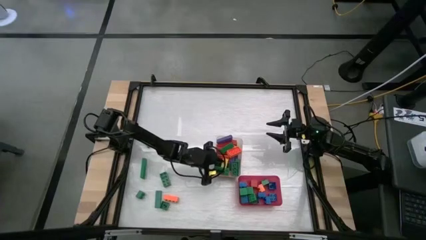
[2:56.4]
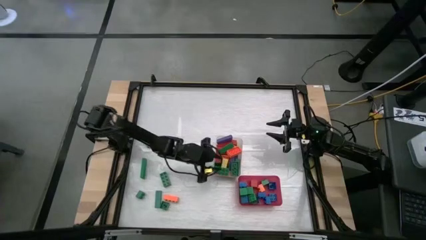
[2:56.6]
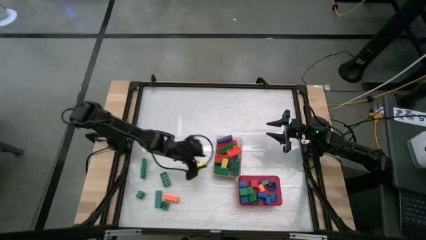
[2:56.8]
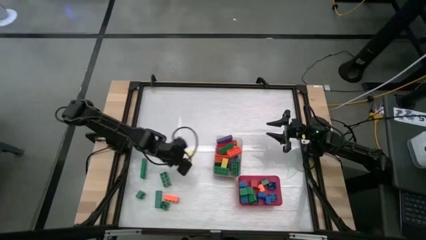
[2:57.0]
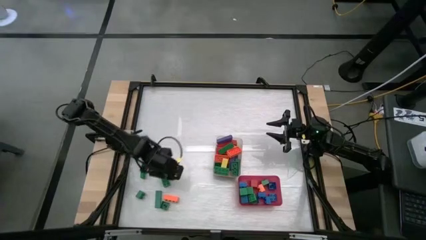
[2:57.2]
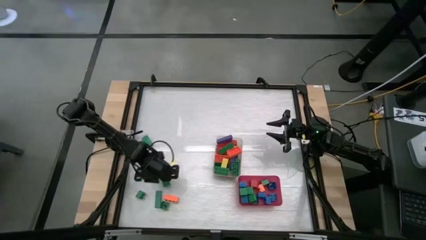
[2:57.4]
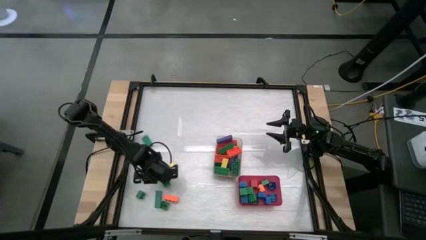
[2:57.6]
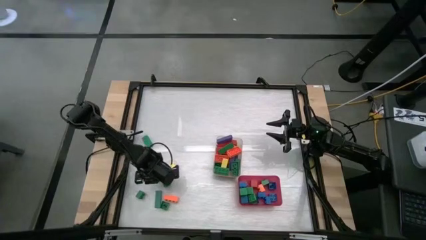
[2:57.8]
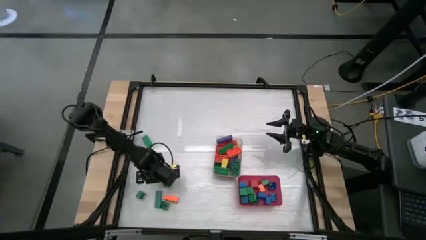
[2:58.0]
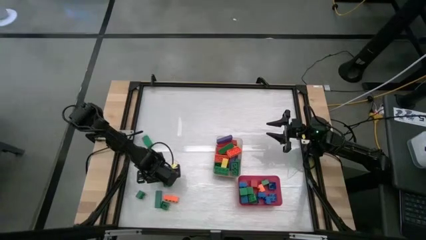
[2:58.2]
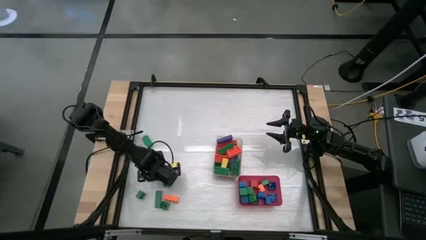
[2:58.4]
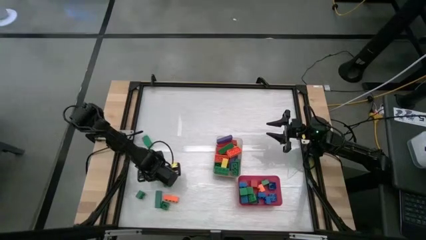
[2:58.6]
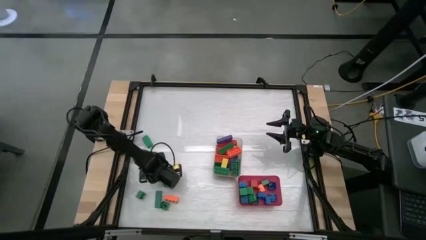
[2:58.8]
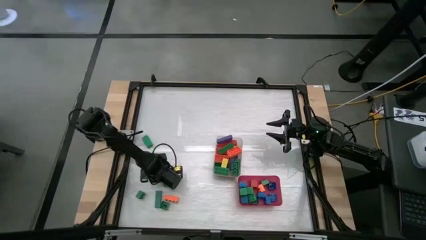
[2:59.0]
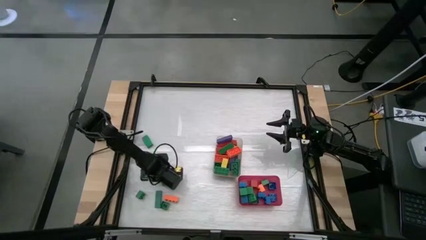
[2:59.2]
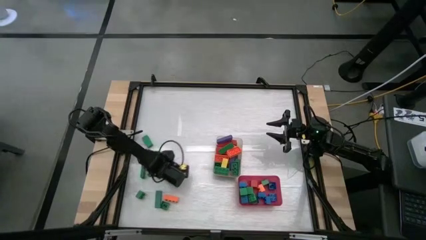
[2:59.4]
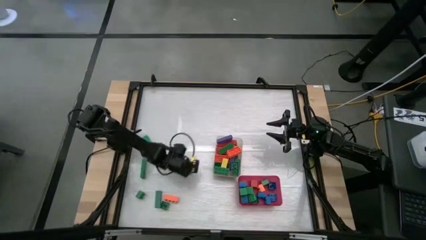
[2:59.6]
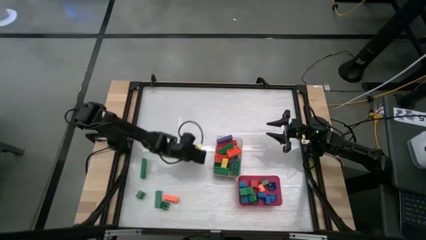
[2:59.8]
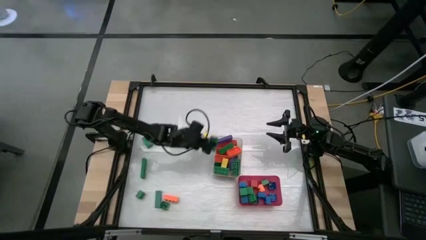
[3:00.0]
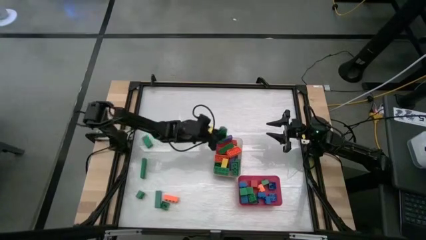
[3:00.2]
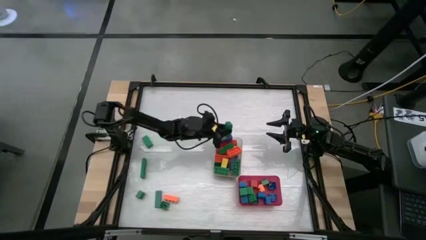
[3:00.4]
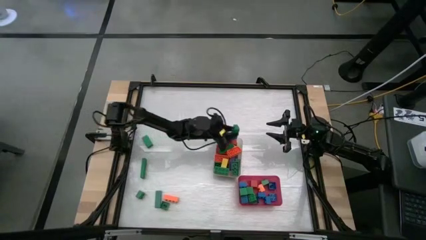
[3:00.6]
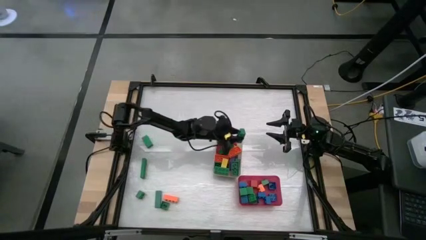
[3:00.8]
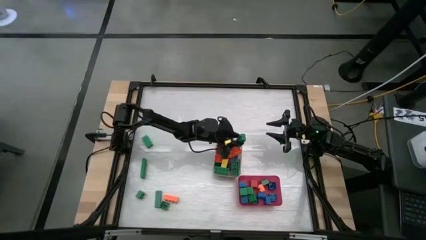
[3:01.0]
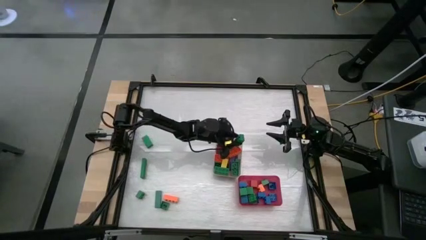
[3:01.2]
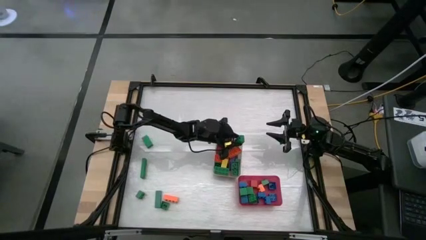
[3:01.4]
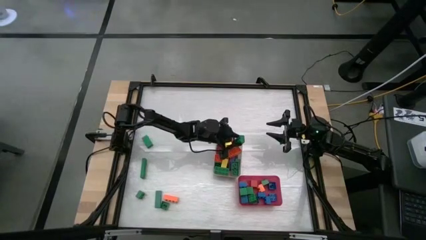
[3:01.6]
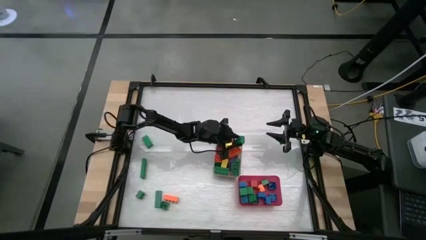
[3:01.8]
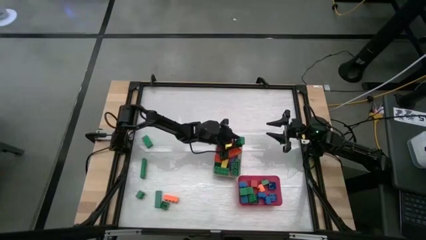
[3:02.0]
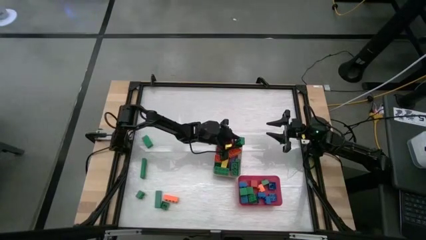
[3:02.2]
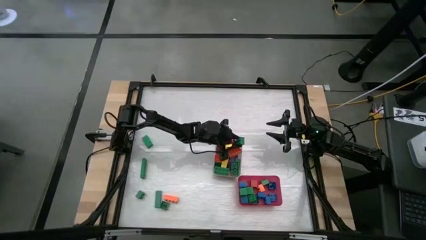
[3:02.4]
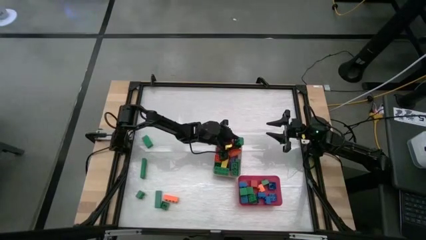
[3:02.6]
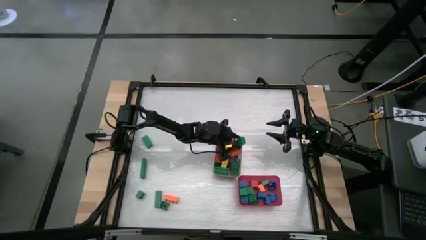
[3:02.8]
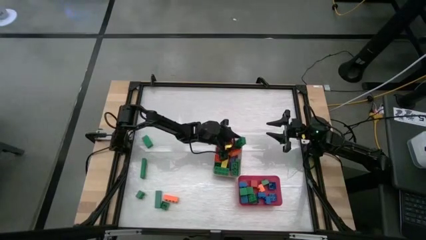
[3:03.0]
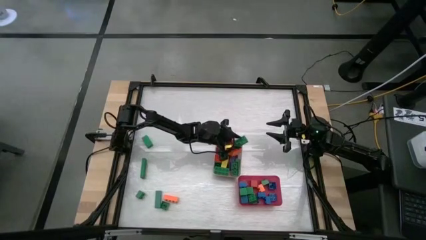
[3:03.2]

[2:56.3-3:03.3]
Task: Sort blocks by size
Put the green rectangular game piece into the transparent bin

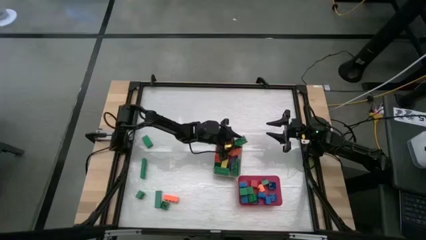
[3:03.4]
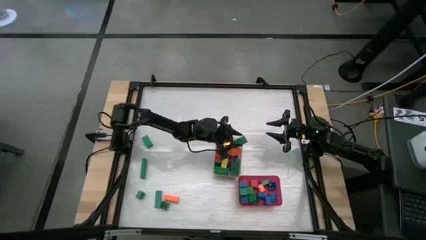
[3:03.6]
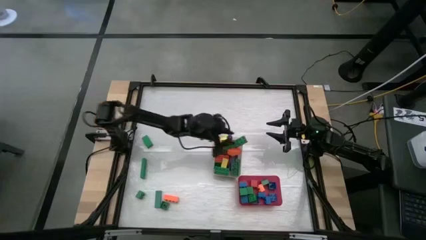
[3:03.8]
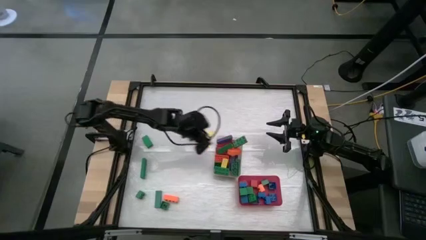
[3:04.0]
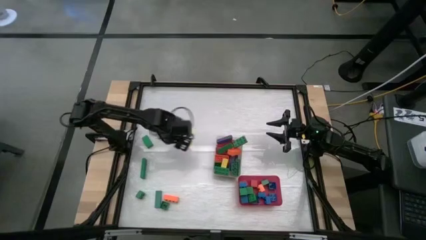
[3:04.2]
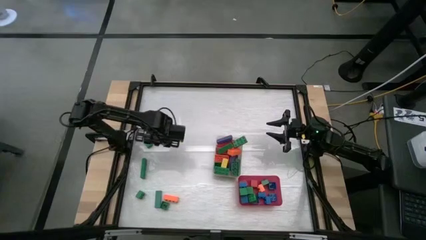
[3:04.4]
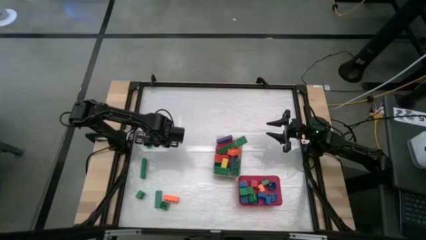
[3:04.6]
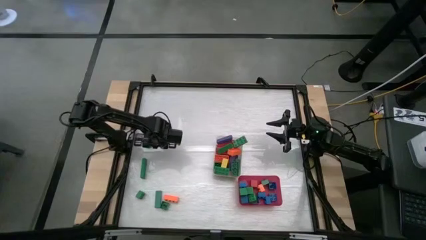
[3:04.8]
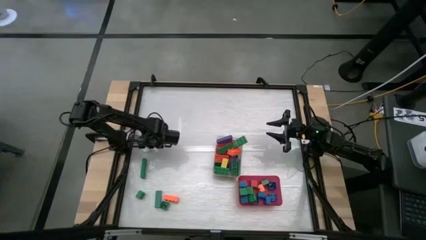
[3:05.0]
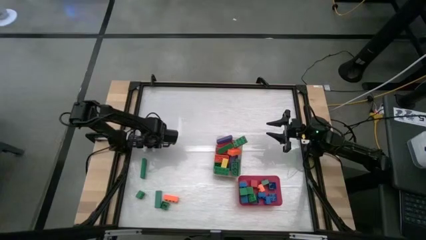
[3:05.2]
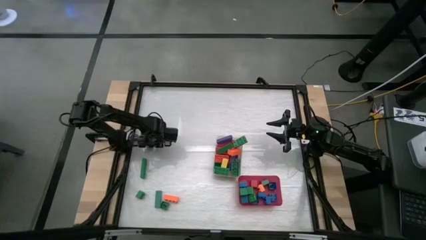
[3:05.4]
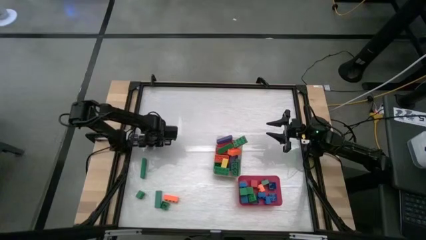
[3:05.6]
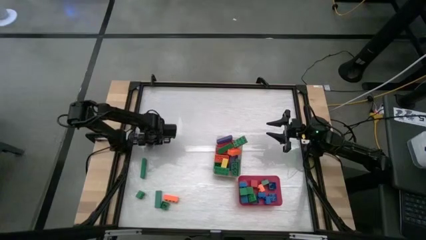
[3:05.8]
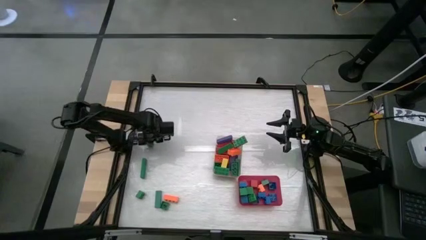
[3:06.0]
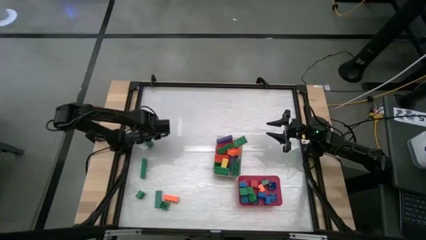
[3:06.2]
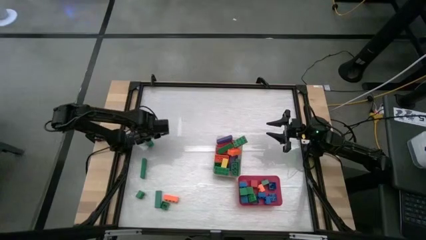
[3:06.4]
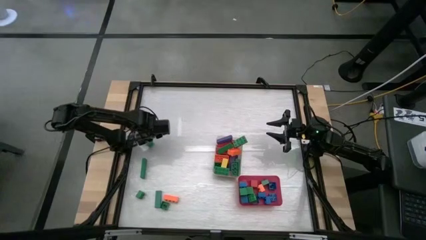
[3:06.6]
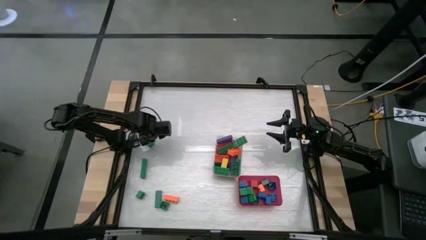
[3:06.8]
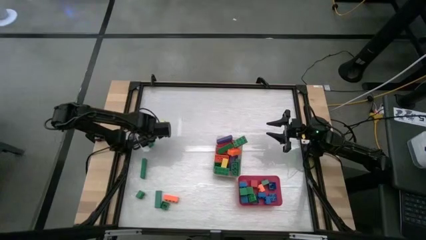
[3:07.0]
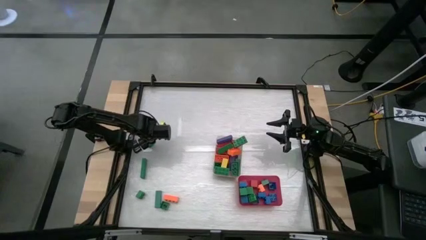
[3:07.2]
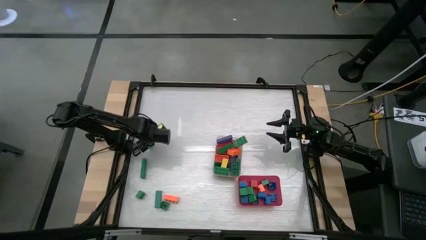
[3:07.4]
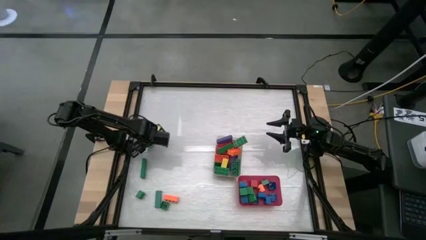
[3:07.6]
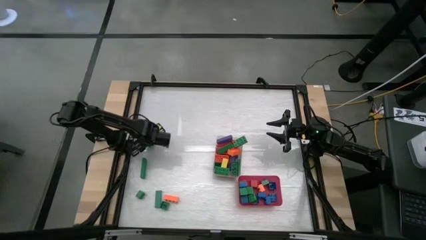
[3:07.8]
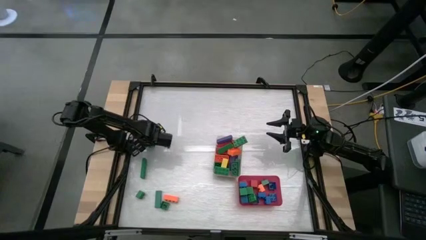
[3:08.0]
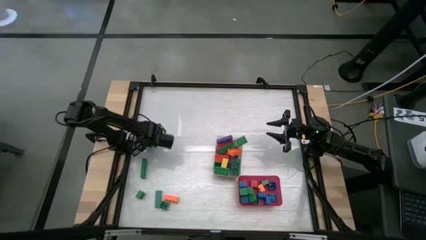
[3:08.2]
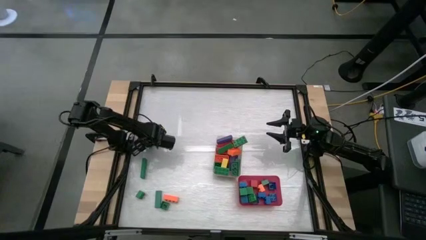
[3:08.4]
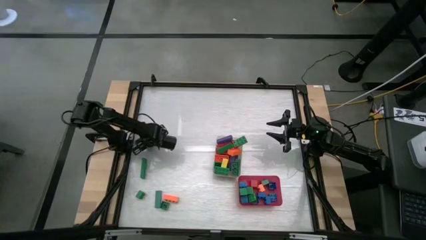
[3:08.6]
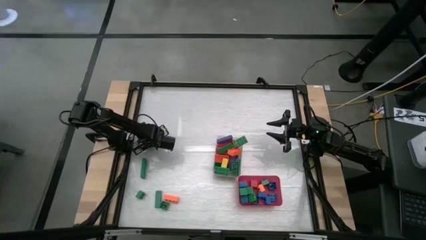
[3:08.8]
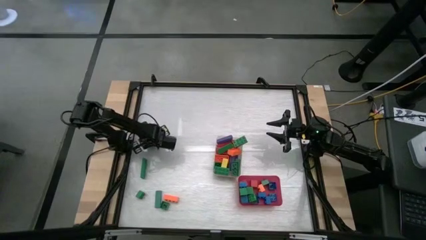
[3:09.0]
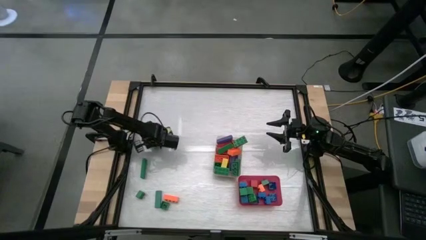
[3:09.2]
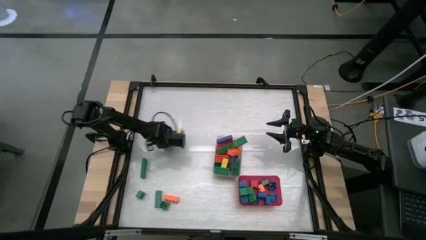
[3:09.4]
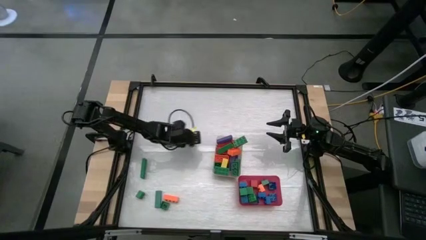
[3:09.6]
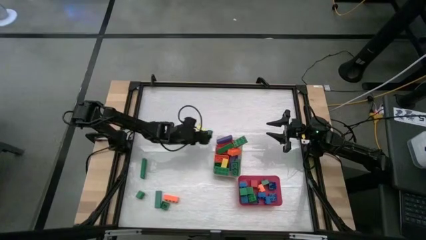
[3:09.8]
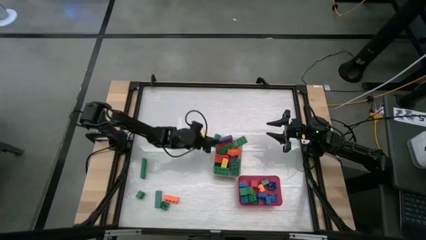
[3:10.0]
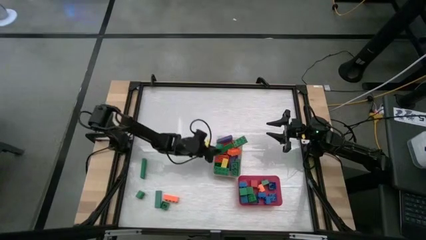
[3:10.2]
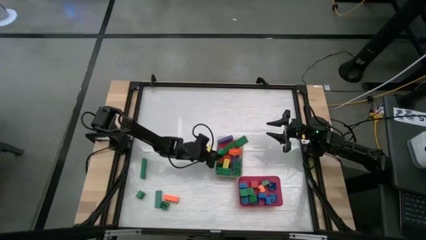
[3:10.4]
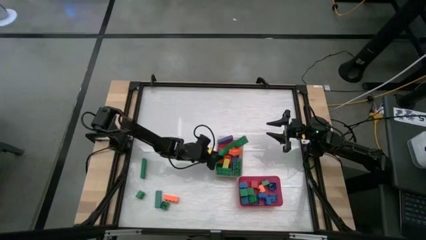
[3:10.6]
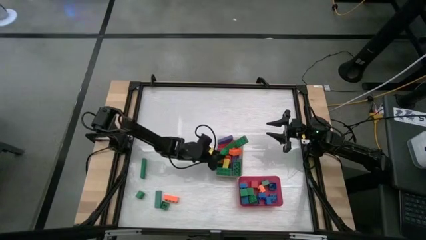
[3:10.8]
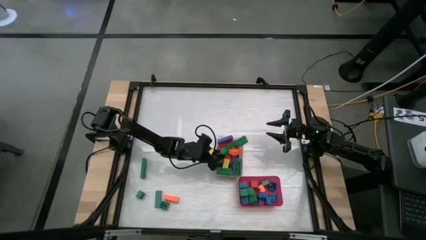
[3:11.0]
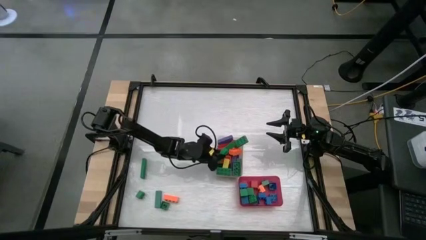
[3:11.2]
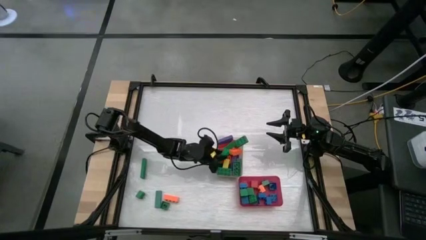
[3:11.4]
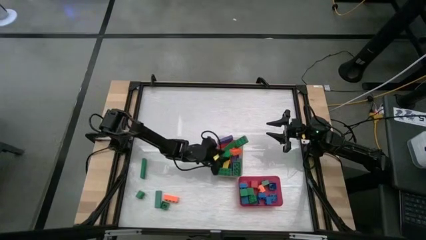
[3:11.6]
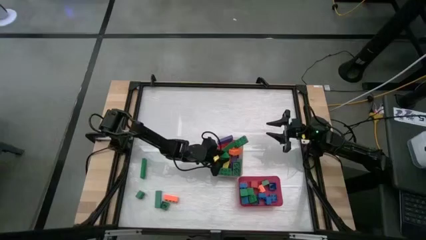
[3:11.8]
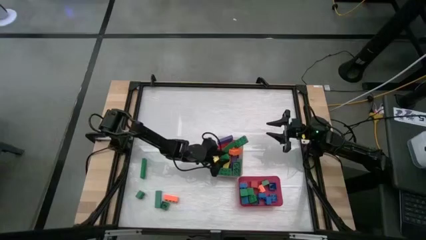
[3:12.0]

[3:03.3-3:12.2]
Put the green rectangular block into the transparent bin
